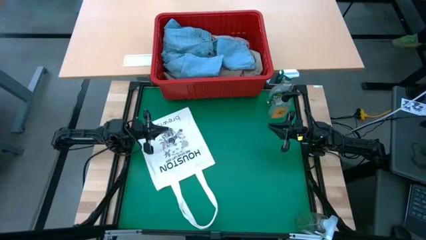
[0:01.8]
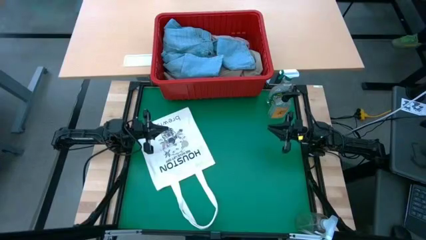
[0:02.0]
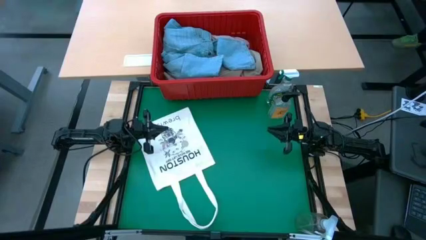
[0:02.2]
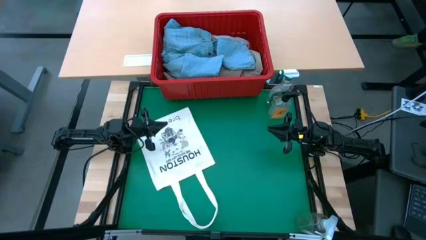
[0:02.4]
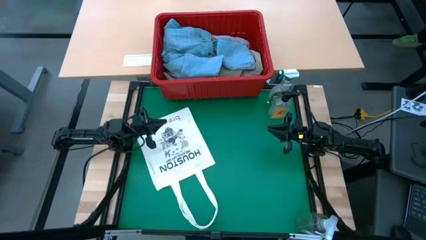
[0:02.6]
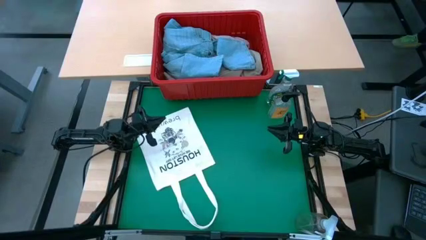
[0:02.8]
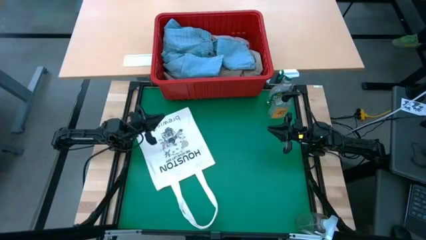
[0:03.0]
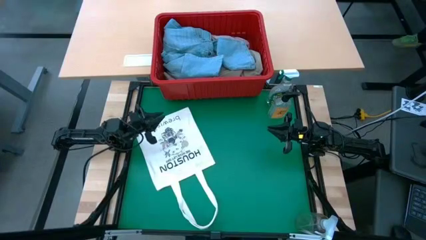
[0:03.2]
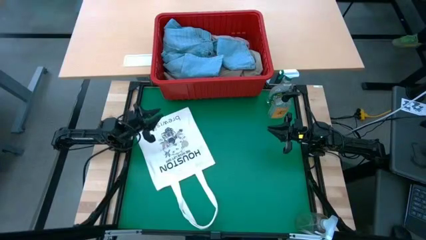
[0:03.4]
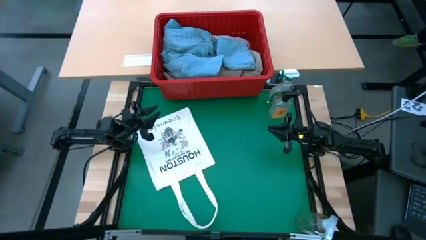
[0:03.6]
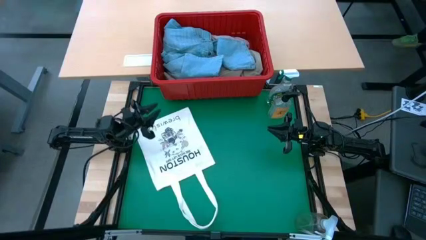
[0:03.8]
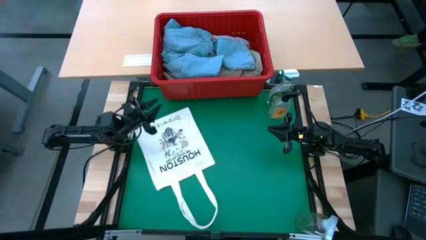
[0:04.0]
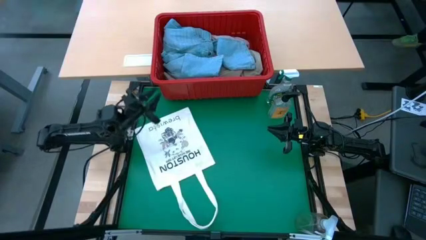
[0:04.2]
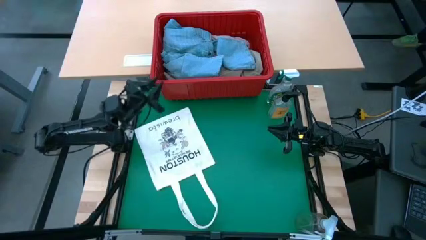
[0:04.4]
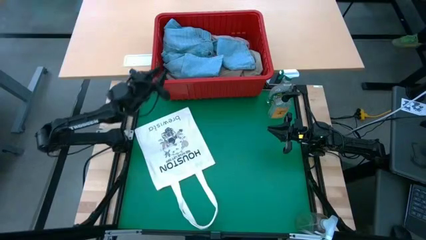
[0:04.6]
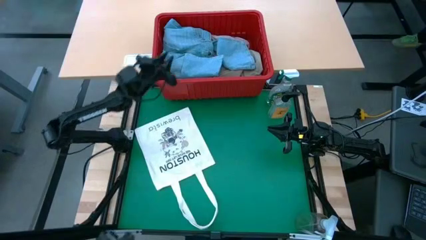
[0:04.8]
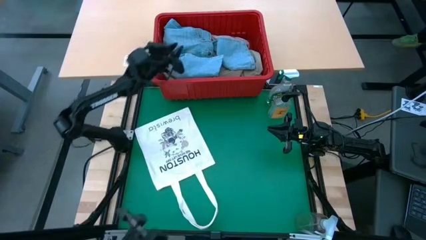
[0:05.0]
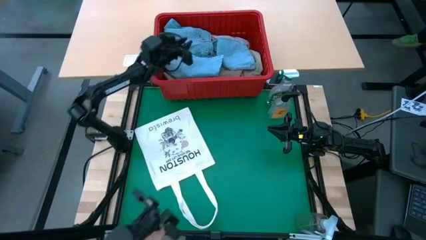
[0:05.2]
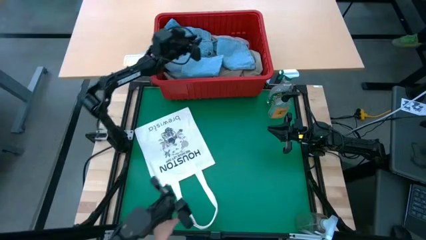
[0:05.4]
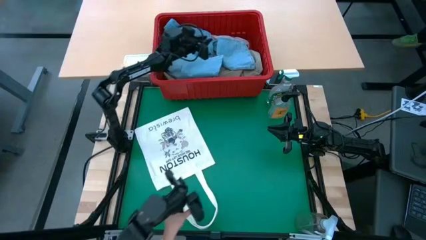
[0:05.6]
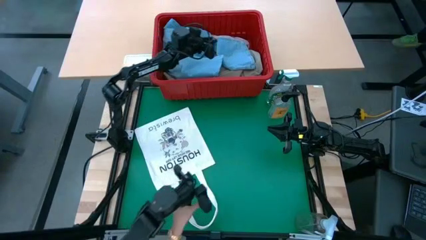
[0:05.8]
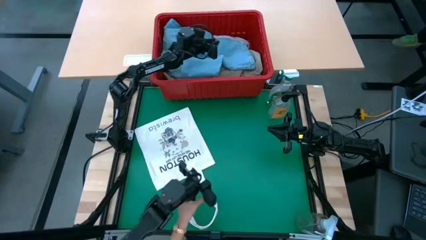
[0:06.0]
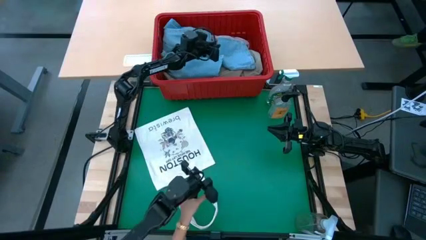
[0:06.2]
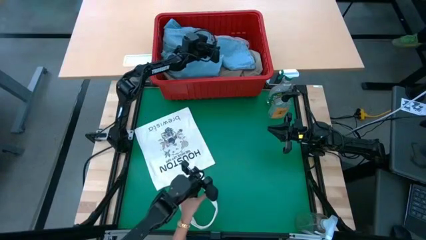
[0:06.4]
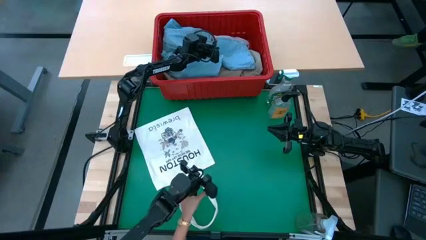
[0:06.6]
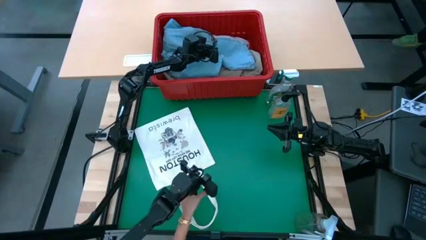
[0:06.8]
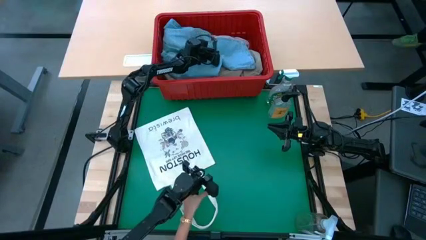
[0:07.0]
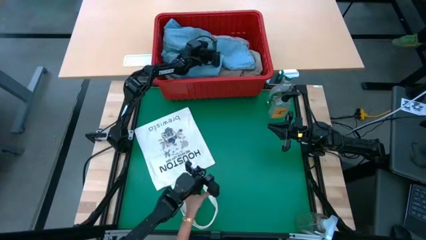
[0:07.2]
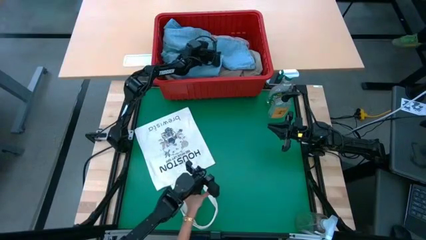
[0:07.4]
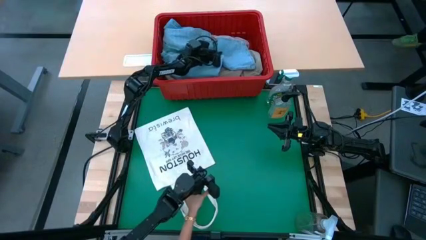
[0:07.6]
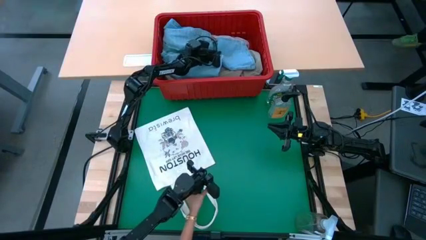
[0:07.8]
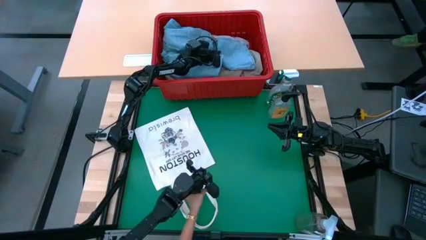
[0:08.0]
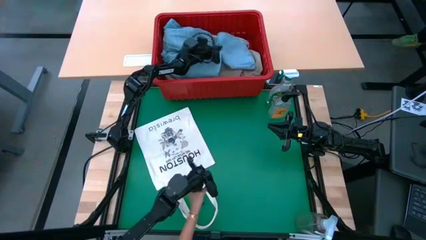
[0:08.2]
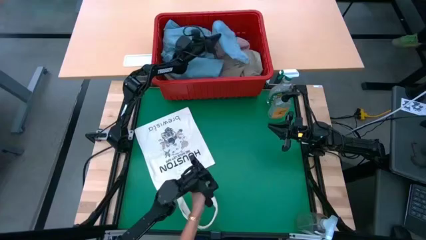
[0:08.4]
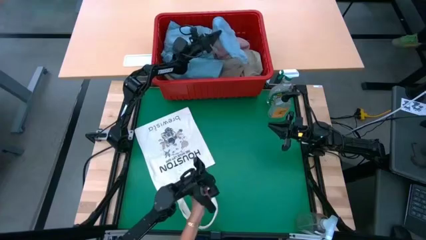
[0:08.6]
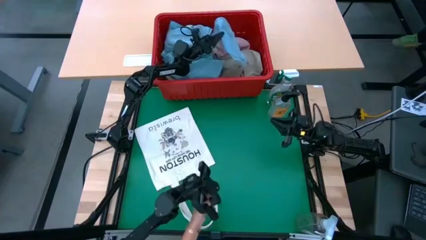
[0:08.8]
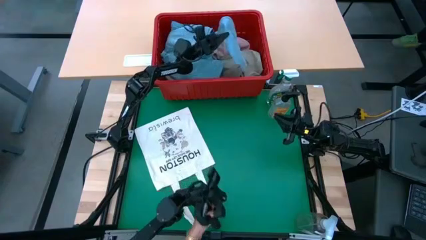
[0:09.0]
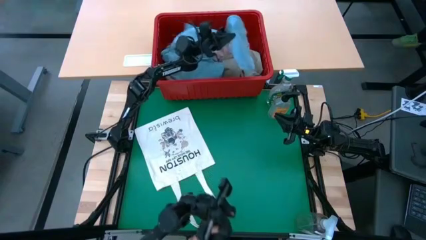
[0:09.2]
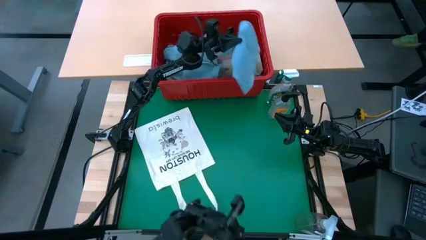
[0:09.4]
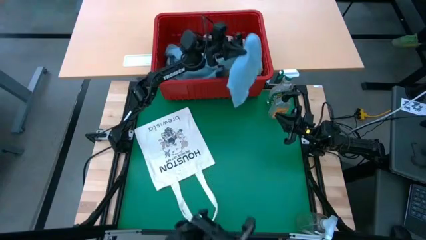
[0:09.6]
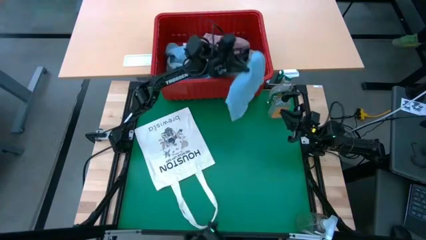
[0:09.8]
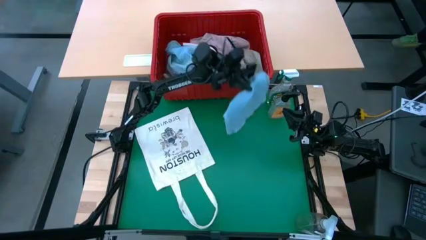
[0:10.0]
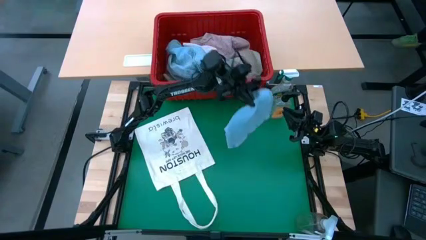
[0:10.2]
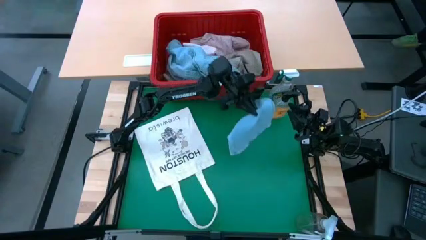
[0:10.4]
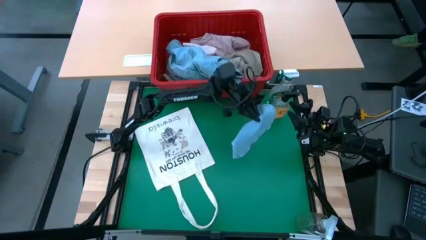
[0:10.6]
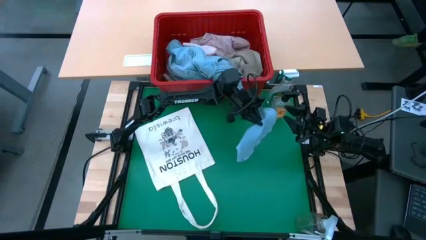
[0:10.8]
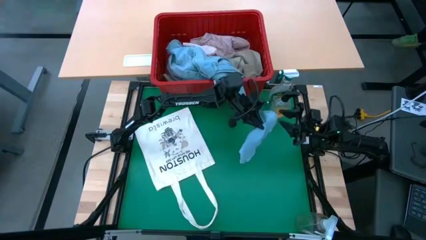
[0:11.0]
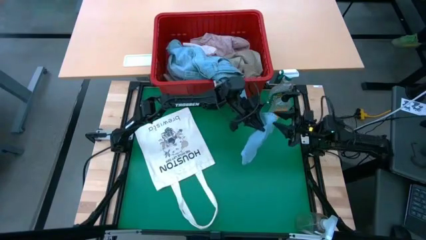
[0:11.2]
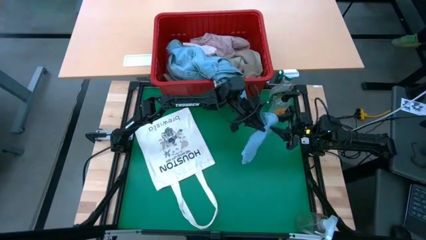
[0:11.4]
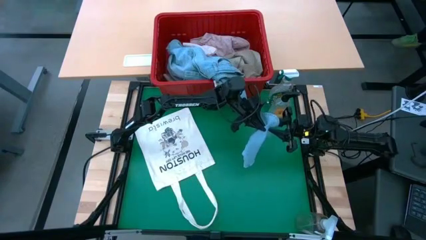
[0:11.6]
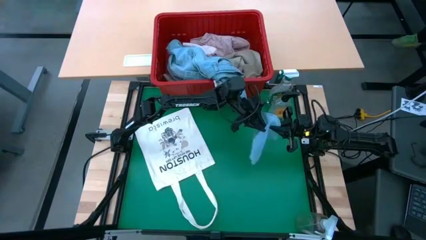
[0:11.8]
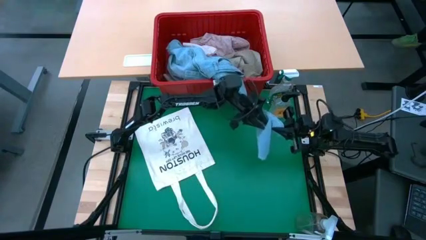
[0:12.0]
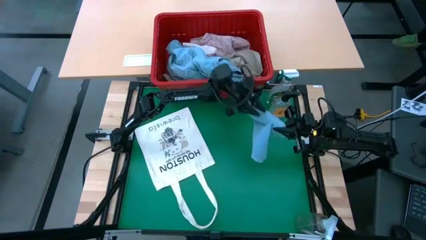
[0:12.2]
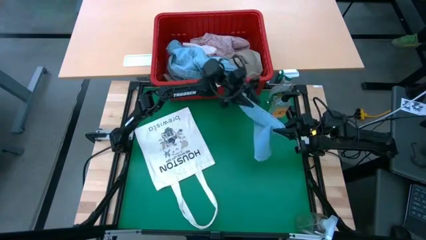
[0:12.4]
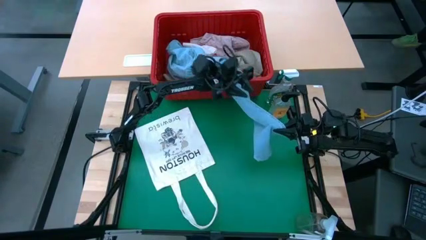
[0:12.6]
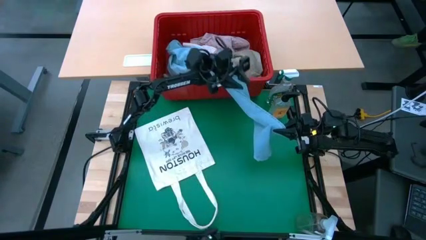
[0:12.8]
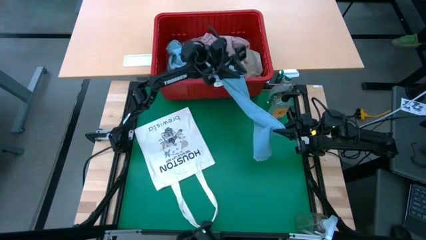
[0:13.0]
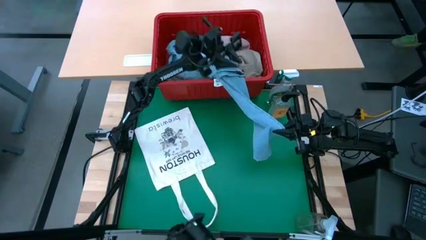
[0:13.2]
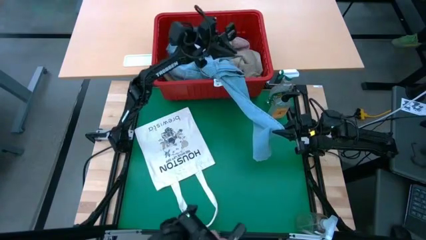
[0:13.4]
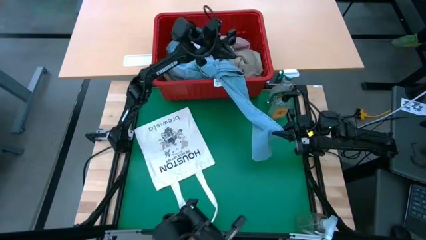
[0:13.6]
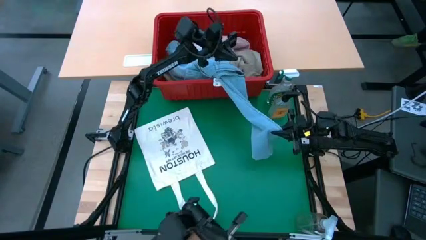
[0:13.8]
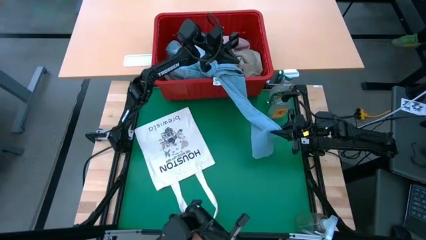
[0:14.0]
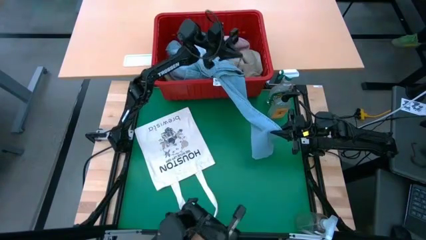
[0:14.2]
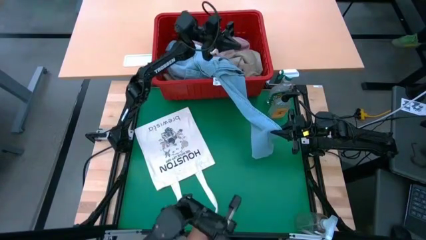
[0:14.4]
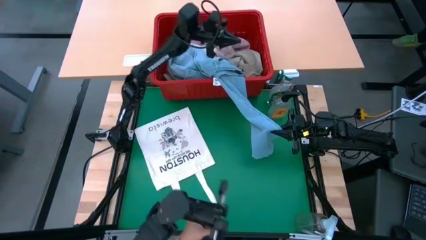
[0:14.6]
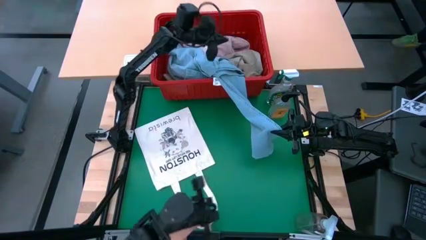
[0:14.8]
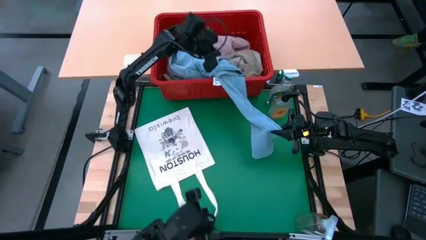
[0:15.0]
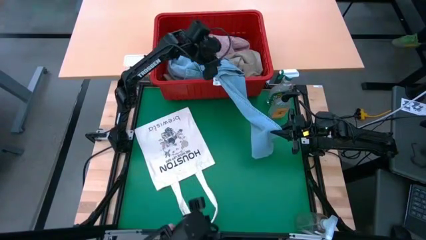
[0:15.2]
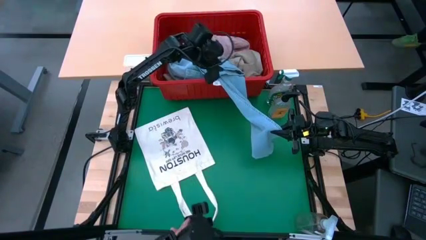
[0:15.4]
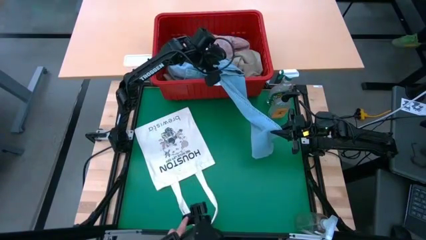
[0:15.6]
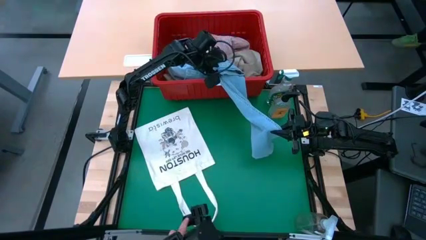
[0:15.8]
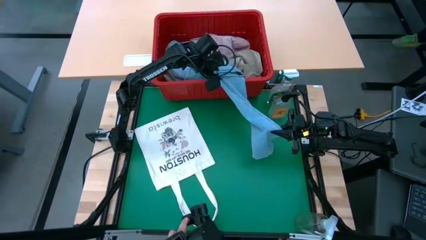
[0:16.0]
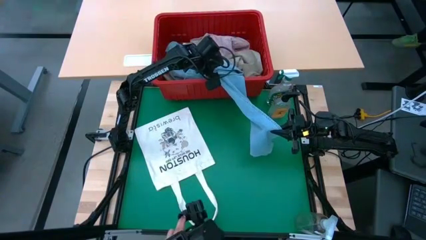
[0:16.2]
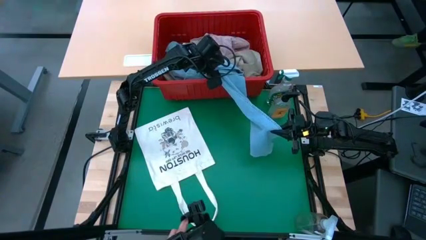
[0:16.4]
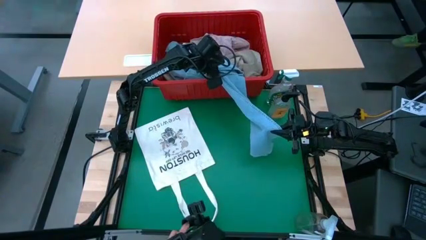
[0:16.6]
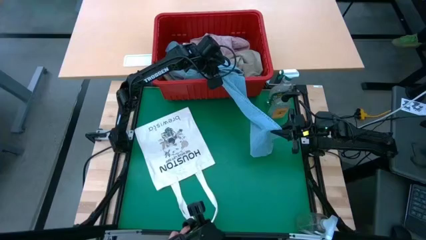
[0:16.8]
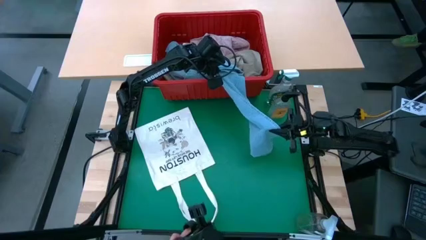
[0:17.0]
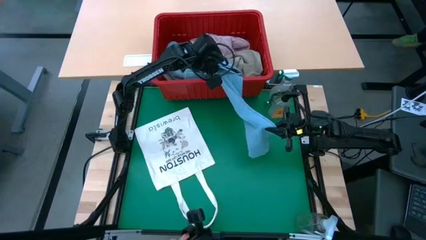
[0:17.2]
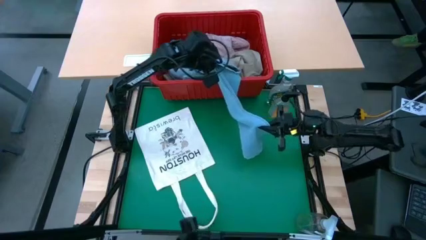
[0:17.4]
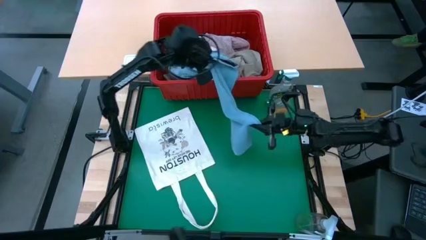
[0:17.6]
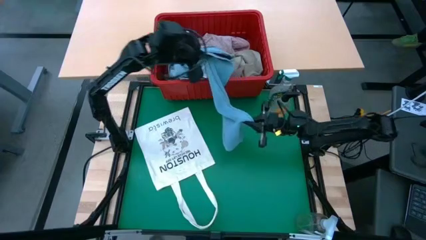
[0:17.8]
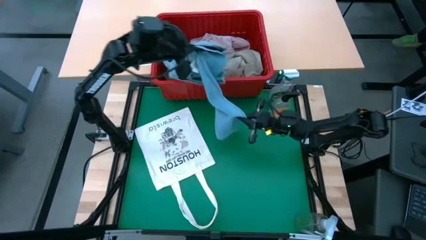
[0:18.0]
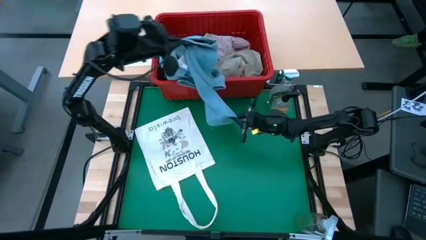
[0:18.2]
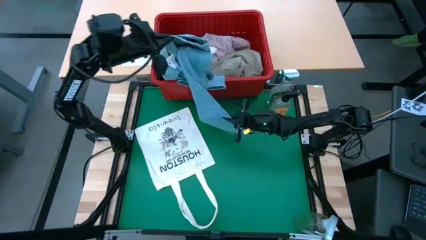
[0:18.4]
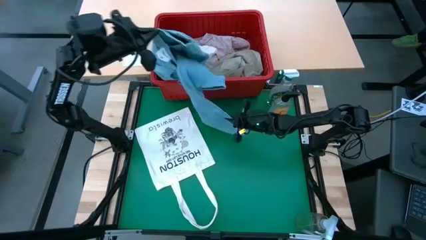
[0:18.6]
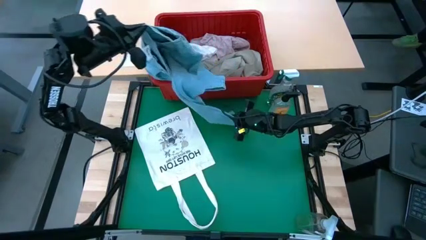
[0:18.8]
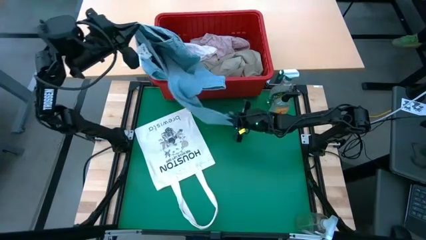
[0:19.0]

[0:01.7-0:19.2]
Task: Fold laundry
Remove the light blue pants from the red bin
